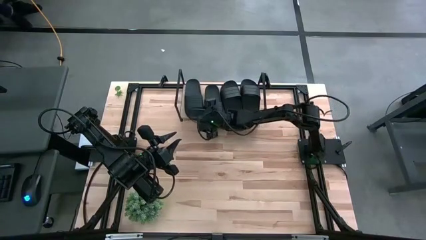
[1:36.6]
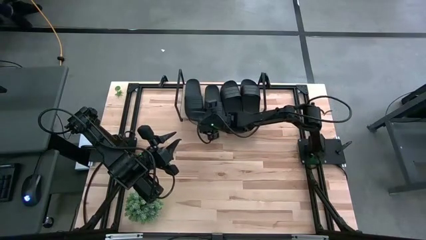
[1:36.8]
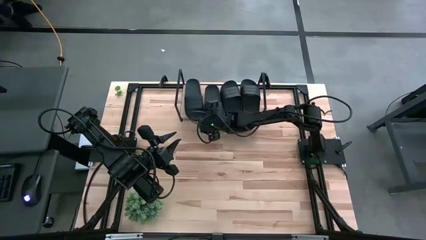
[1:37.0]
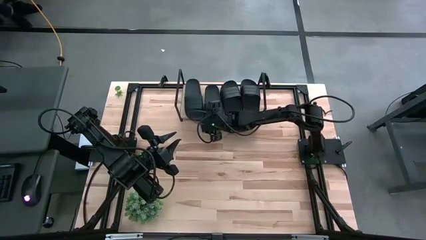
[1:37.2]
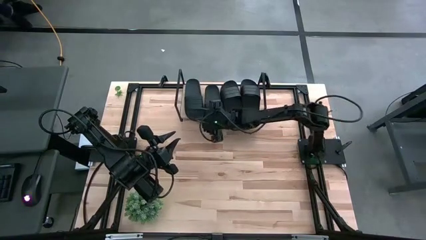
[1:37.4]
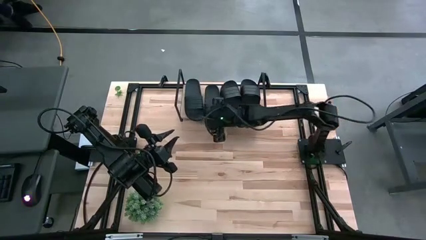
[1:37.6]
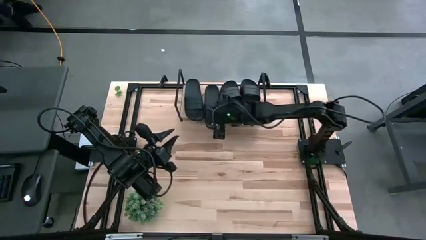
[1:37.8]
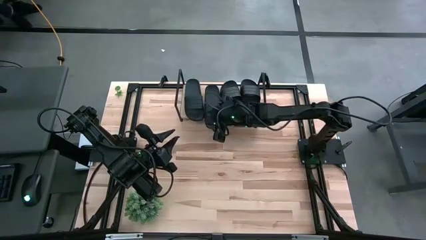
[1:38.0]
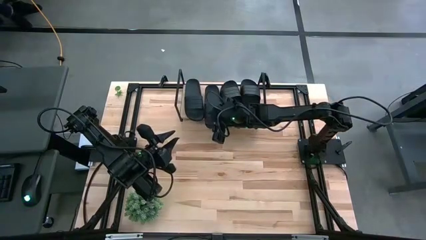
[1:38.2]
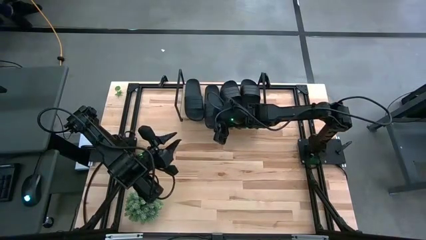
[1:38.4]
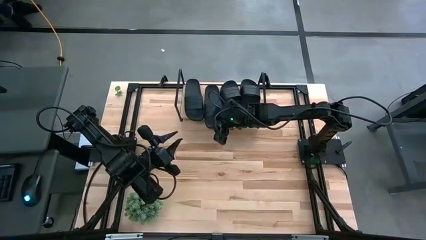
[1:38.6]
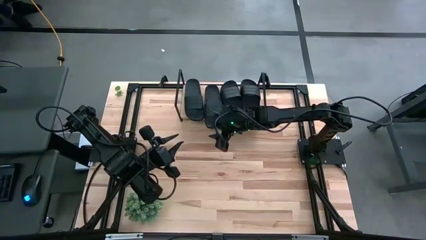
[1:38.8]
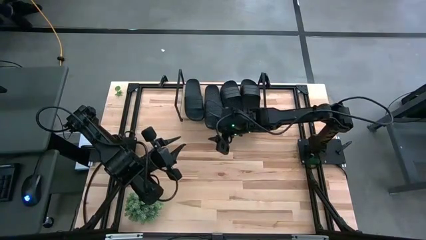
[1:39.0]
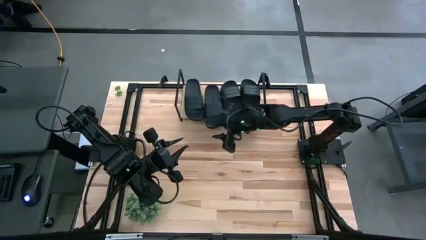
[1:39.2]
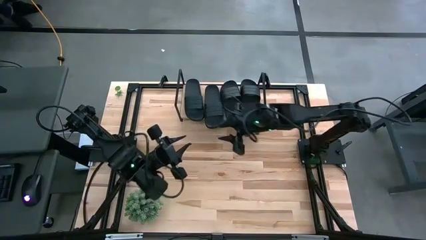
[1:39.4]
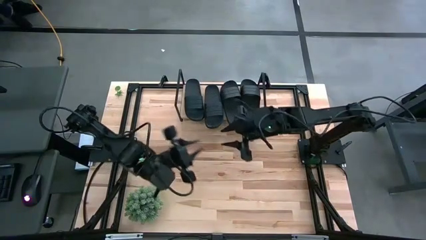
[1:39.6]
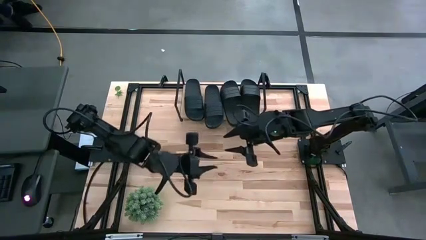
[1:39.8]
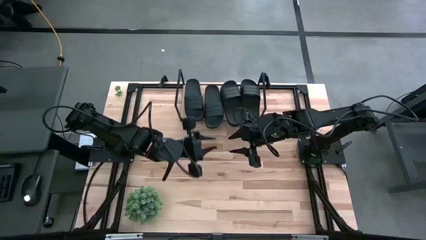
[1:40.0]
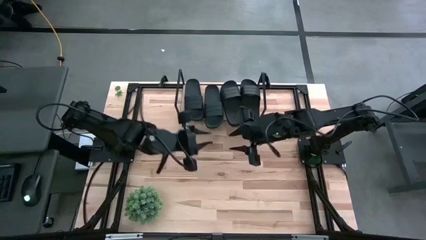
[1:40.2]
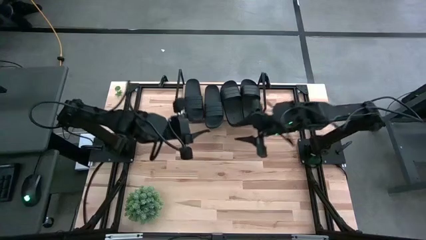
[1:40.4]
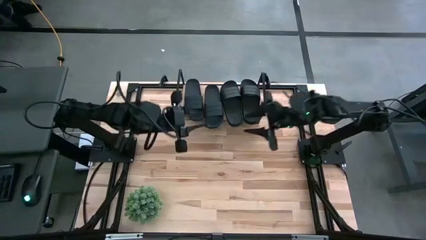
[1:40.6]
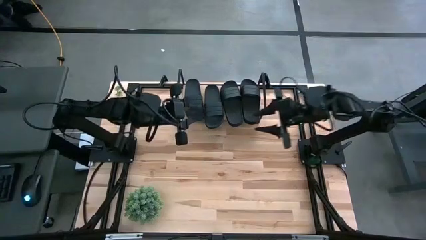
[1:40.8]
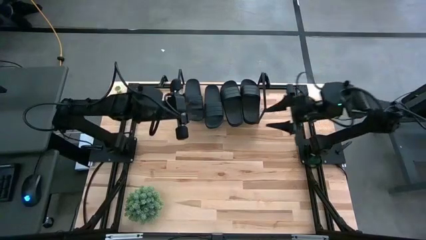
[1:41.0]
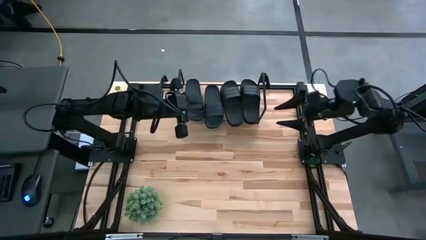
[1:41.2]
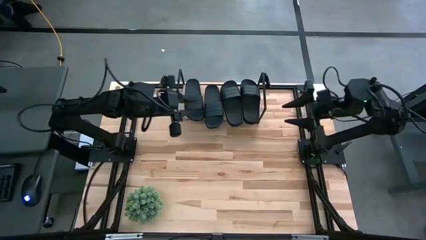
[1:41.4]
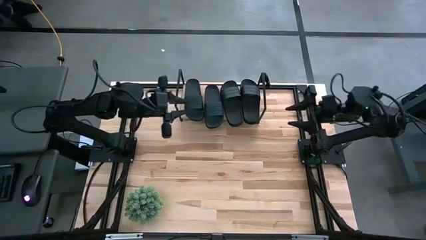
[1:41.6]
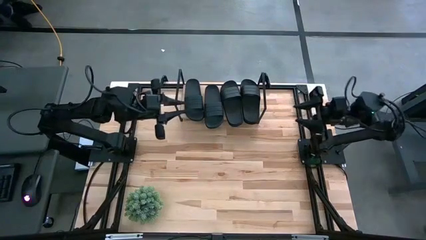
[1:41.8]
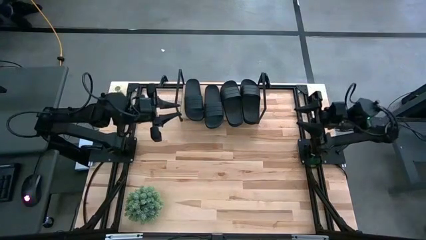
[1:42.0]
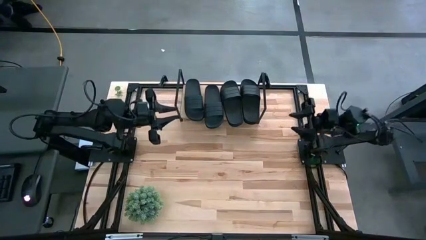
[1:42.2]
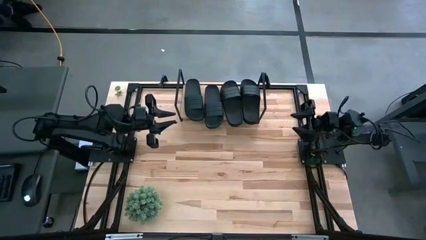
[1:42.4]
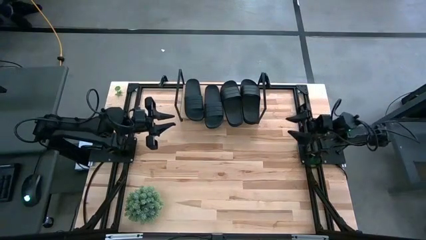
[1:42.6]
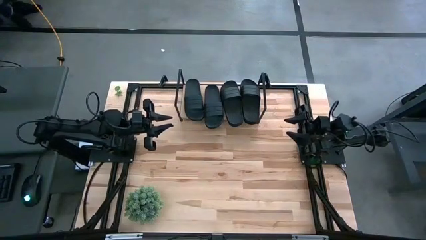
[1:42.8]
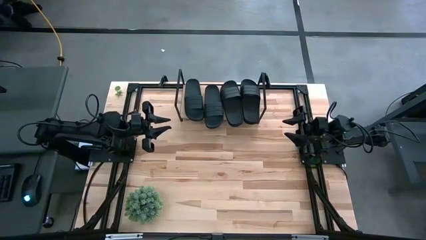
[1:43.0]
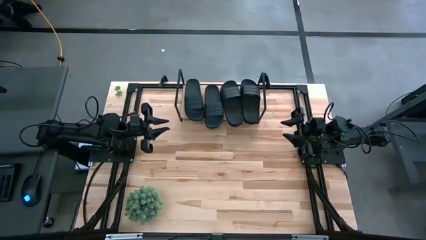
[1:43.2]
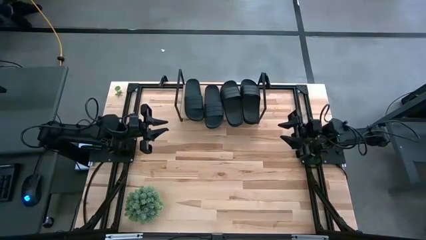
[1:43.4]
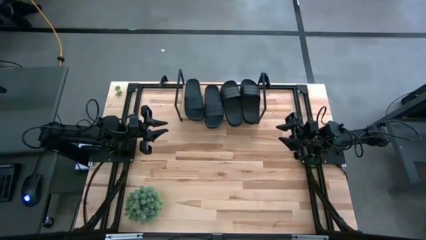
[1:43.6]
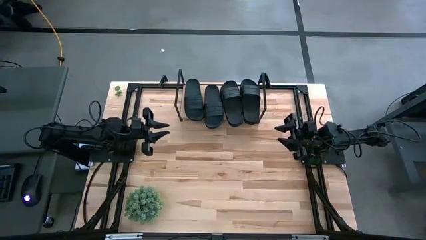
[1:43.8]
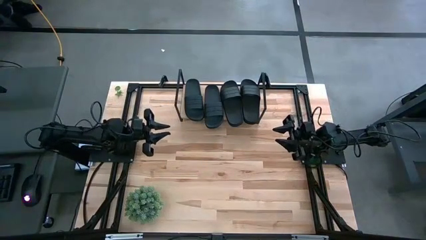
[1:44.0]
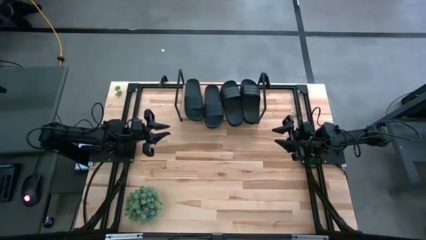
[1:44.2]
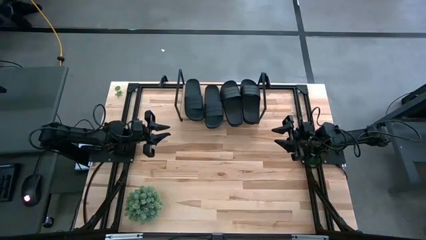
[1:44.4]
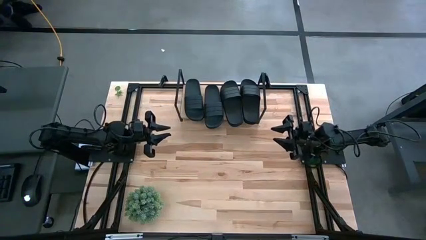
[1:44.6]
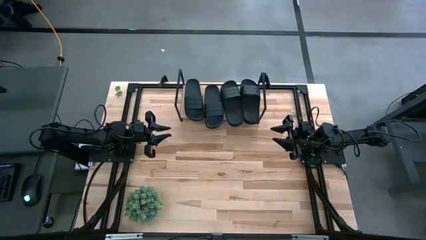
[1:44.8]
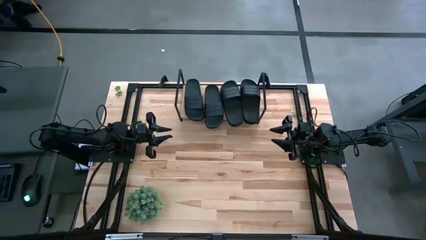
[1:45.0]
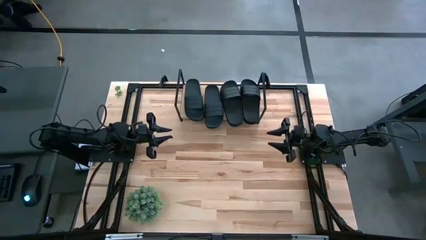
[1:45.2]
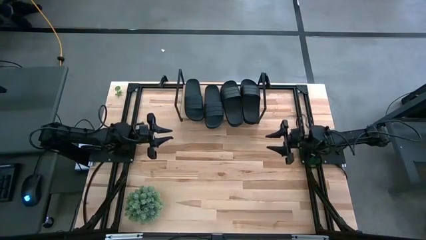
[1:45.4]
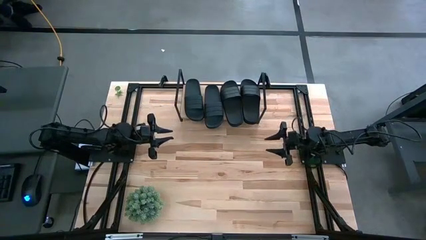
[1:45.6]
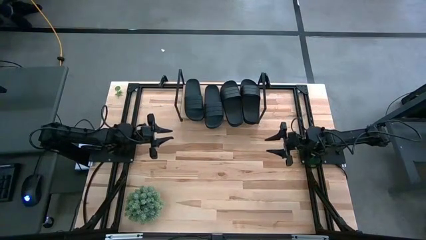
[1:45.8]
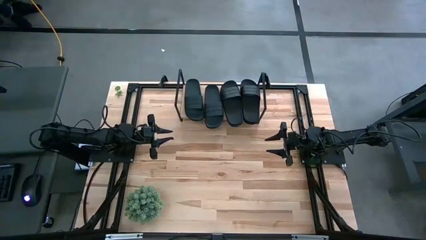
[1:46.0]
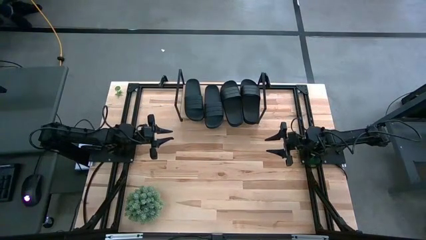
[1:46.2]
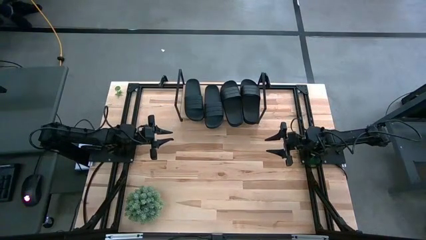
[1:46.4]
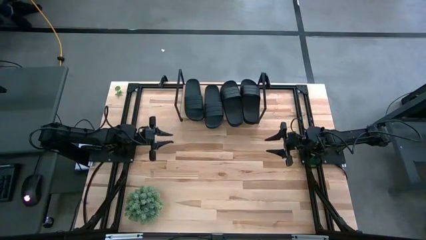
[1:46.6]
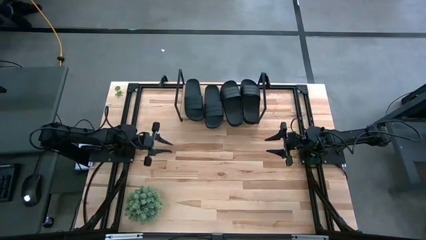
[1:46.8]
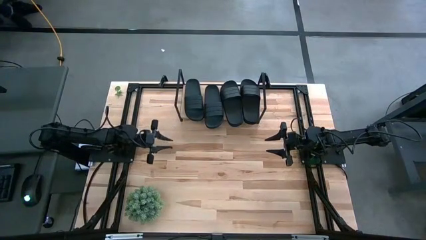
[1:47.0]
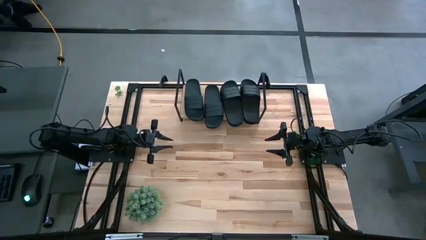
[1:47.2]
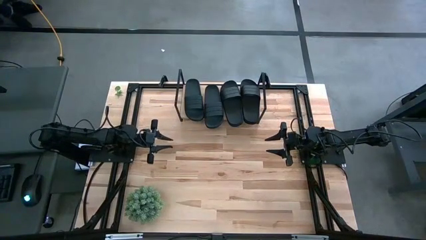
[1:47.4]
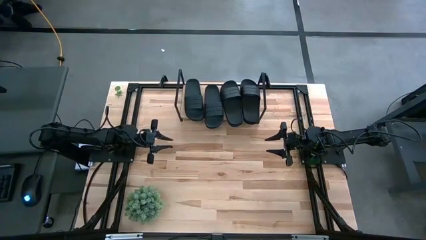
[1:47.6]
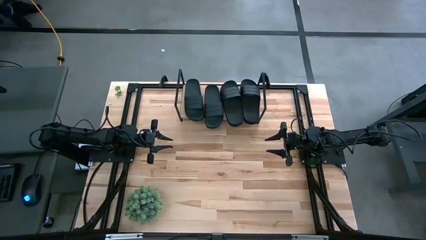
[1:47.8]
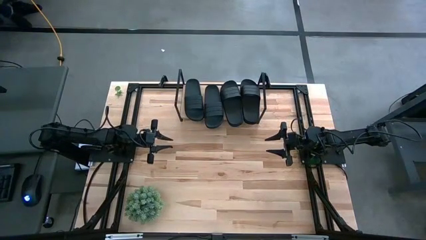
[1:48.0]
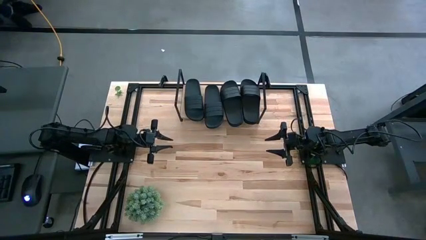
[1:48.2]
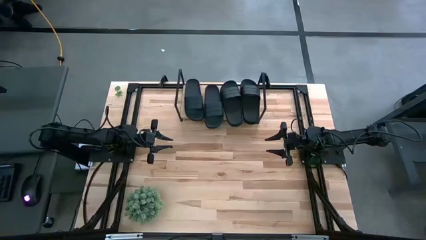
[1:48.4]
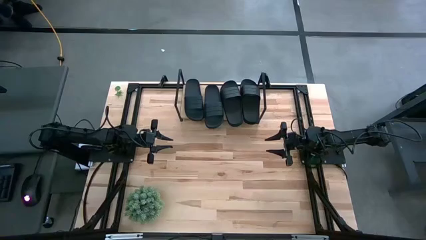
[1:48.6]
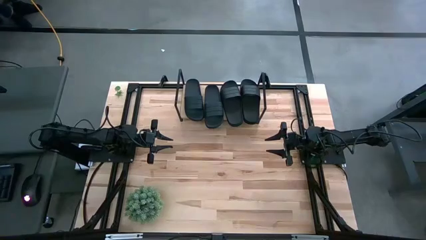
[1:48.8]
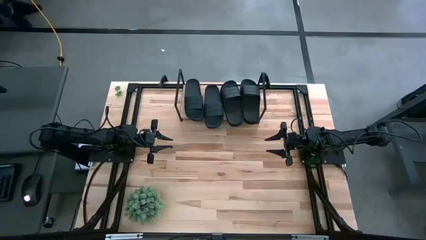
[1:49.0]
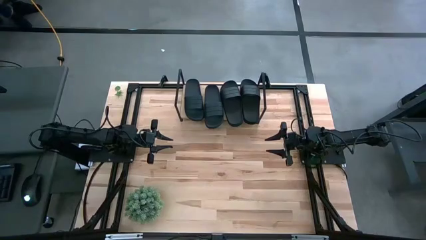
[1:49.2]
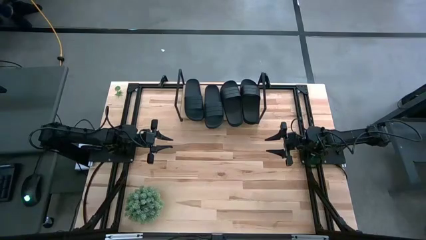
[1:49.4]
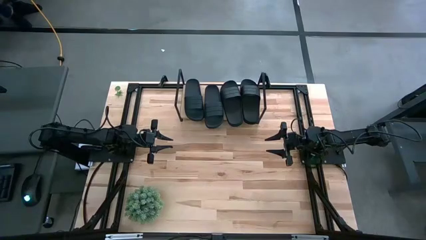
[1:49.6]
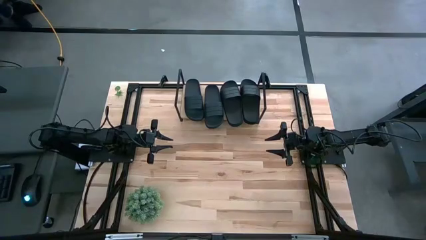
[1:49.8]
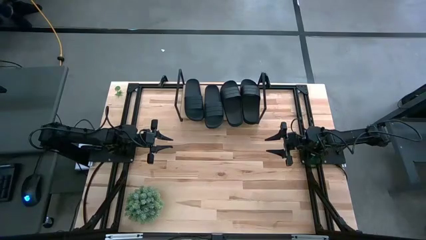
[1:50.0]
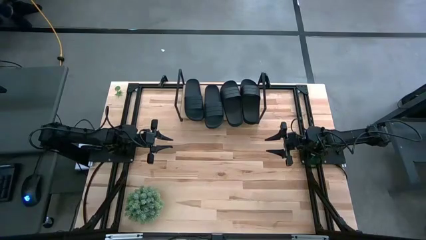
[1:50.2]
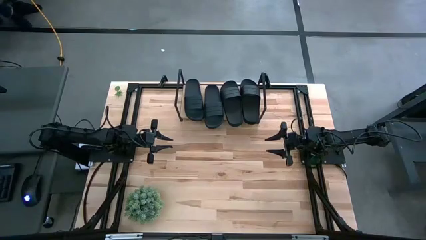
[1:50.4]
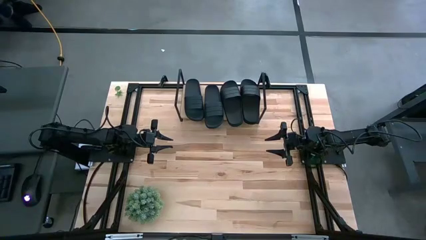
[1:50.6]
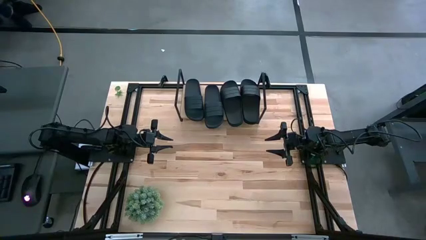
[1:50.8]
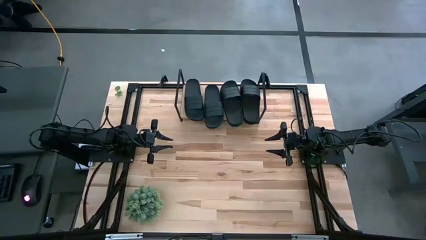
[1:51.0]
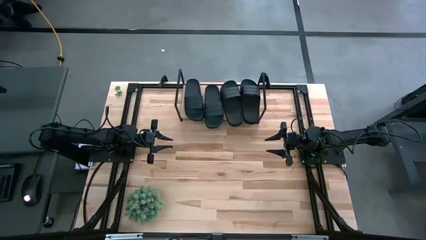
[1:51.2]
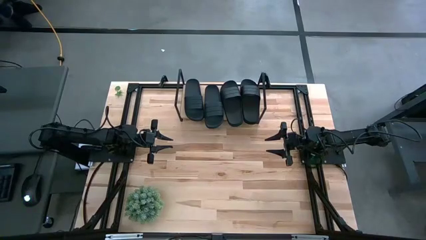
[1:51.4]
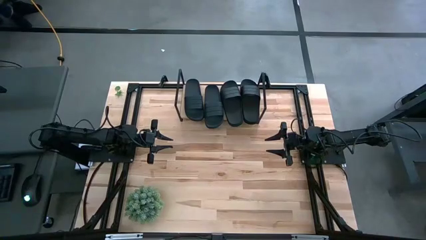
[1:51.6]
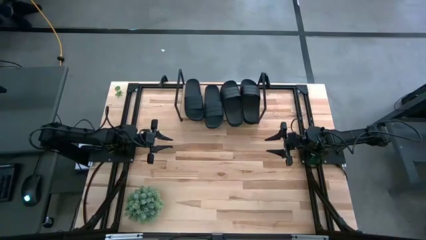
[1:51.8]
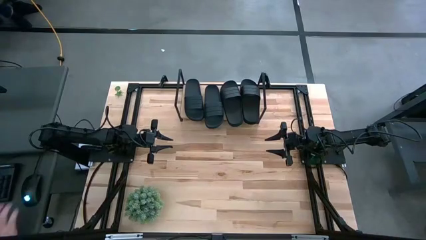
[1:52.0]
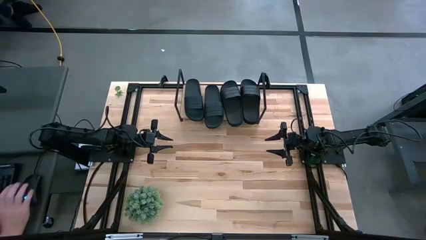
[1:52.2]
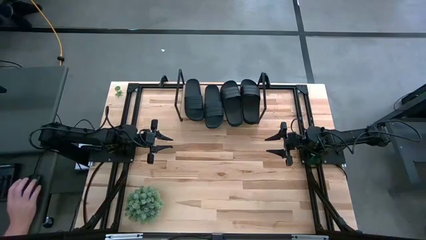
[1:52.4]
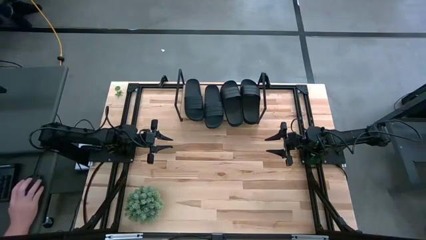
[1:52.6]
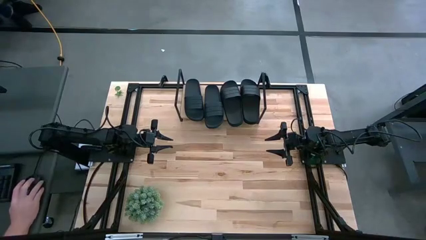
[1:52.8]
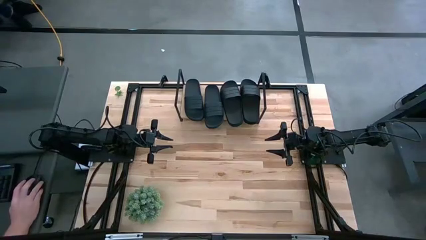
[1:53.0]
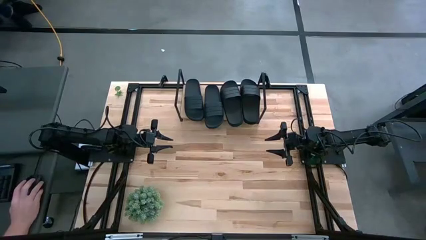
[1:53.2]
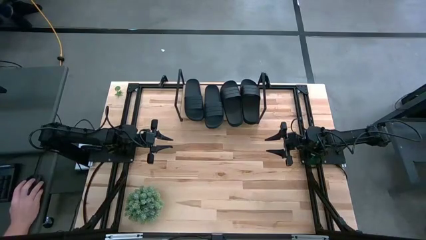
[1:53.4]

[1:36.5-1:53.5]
Task: Pick and place slides into the shelf
Return to Home Position

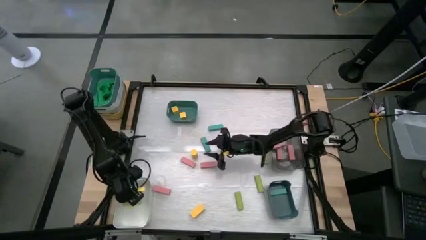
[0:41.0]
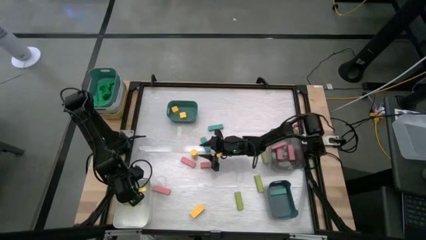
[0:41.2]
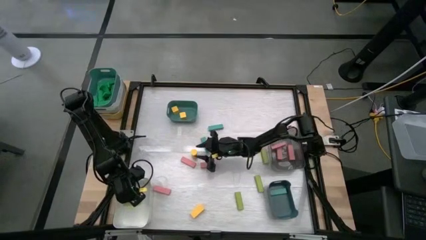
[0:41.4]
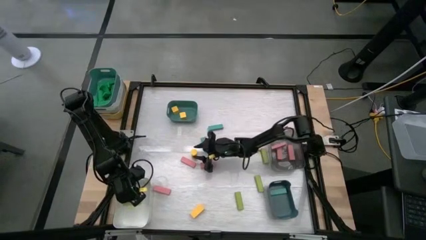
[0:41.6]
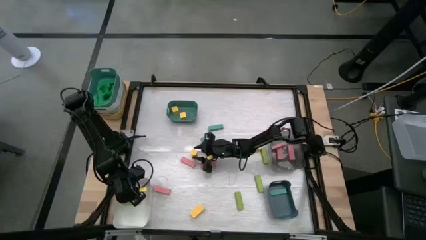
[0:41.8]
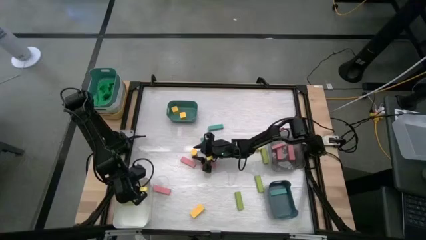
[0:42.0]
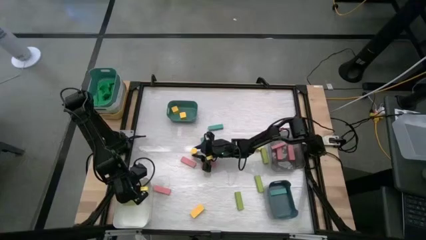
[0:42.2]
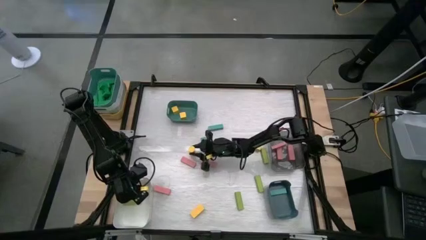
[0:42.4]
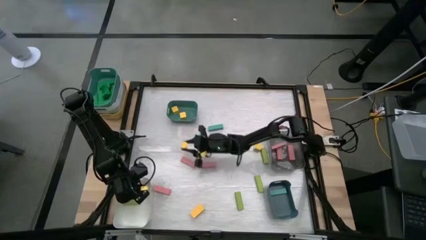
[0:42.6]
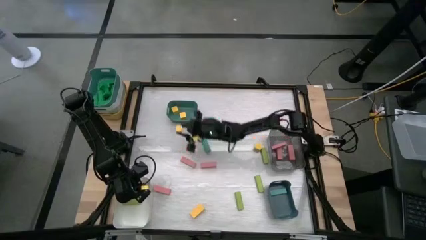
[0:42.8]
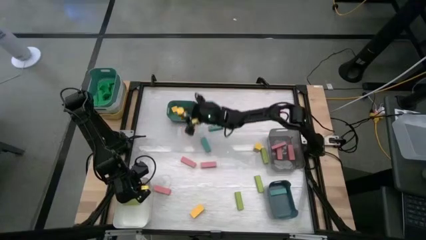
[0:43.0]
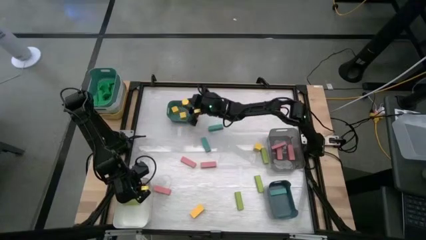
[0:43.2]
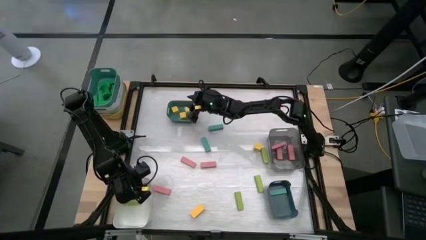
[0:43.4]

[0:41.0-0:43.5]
Task: Sort blocks
Put the yellow block into the green bin
